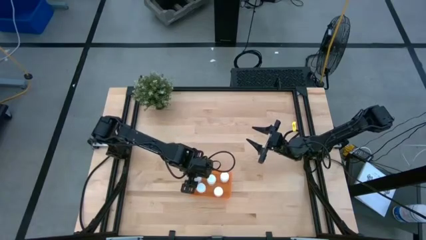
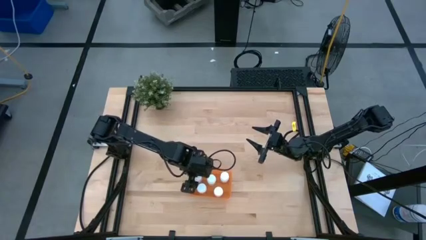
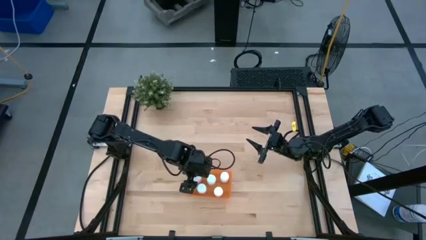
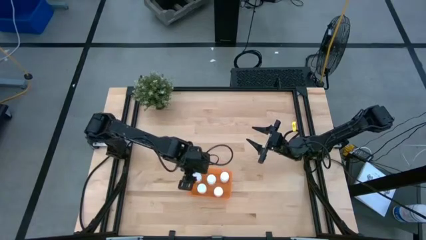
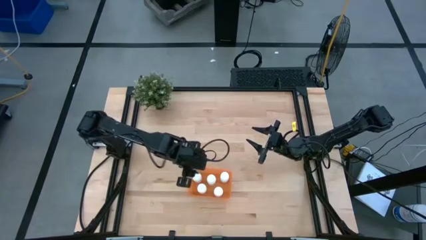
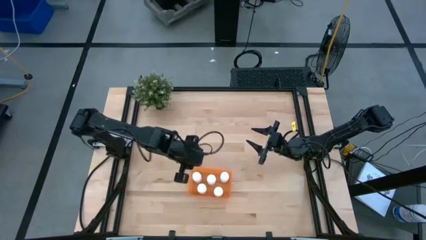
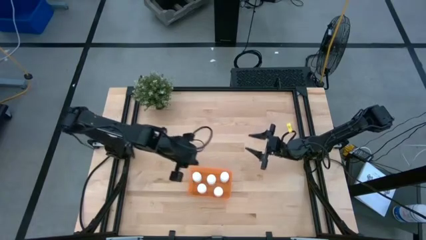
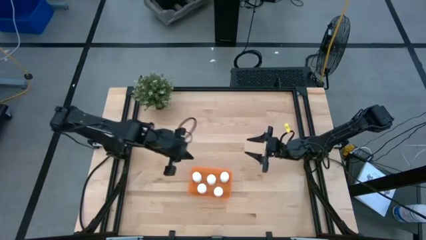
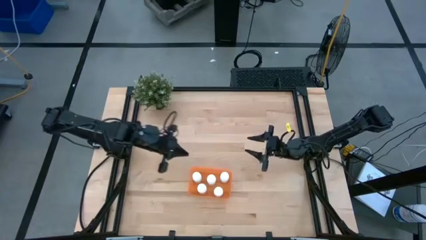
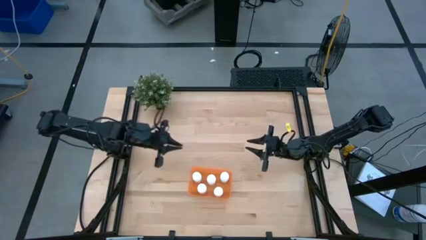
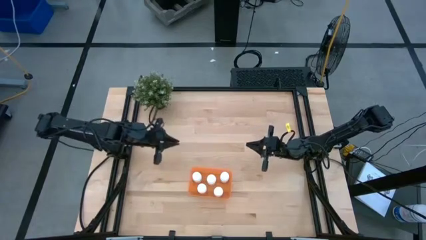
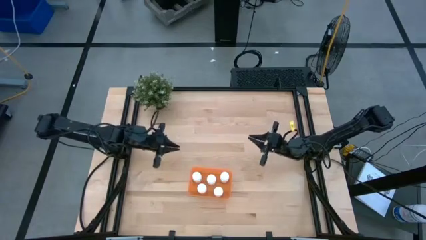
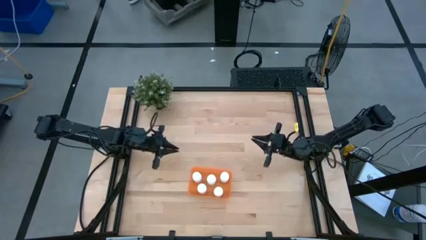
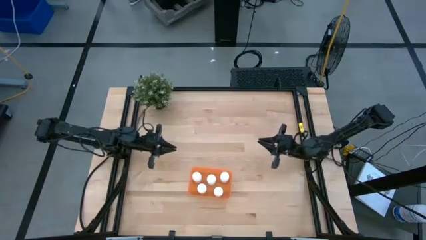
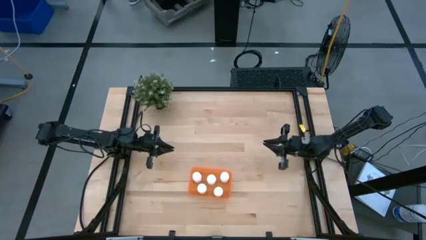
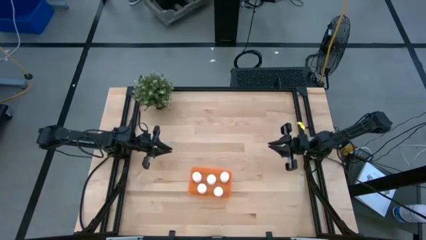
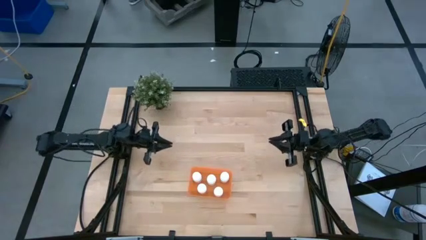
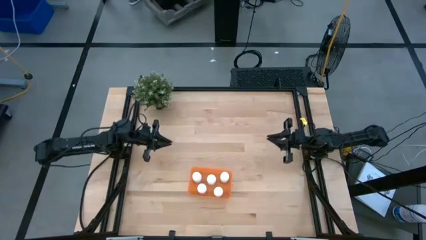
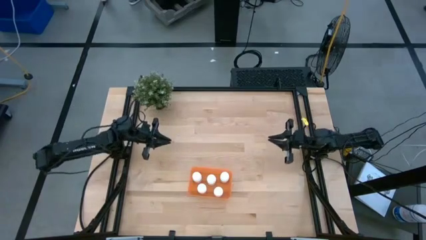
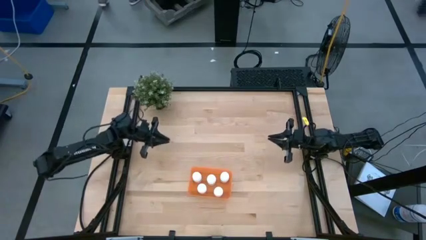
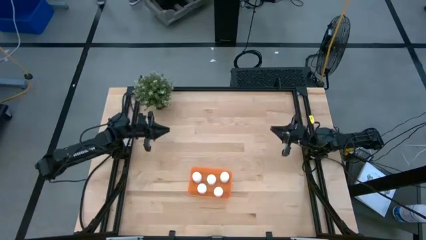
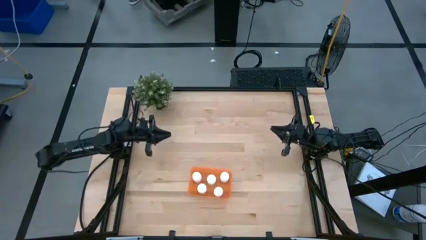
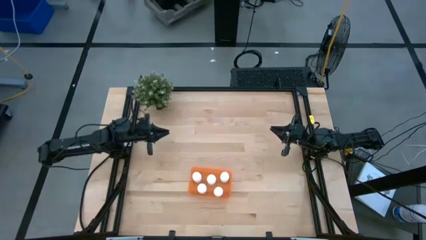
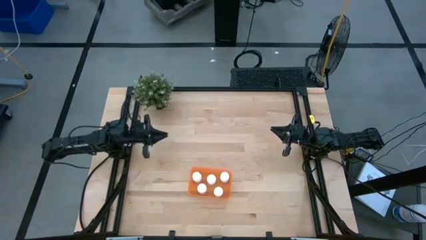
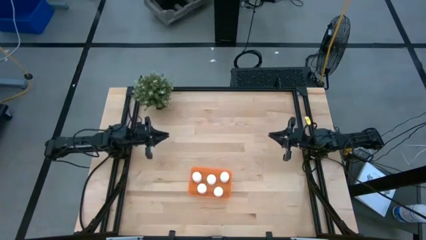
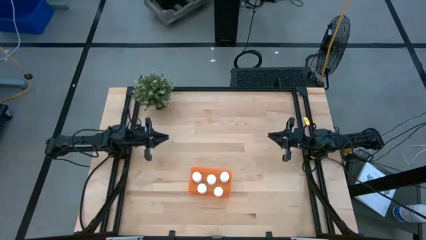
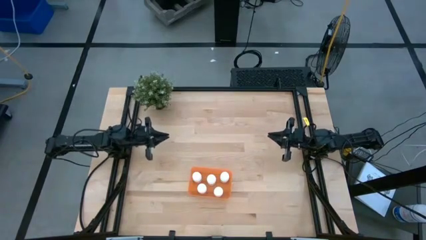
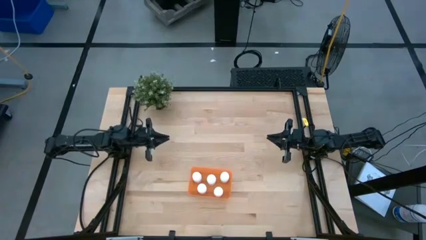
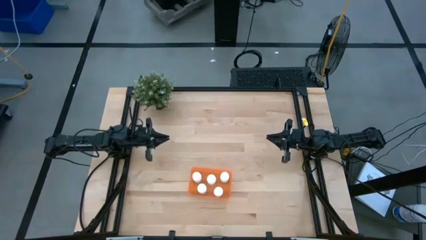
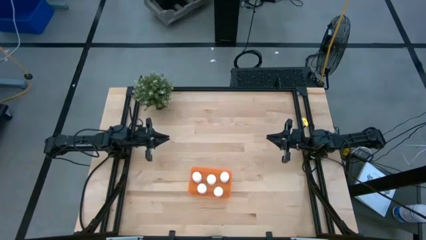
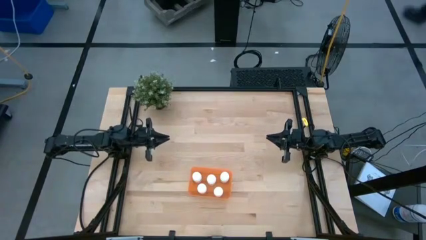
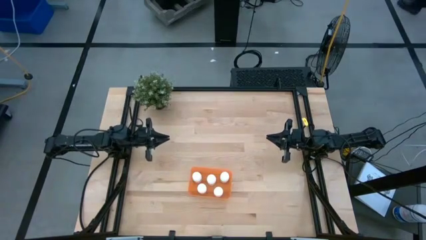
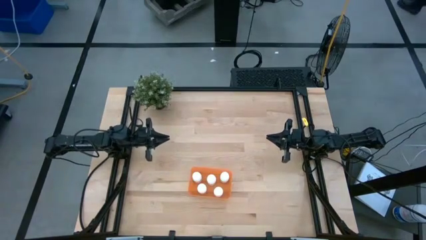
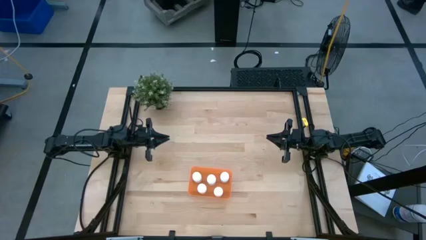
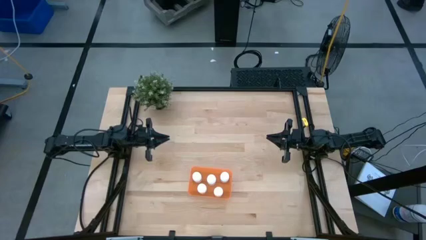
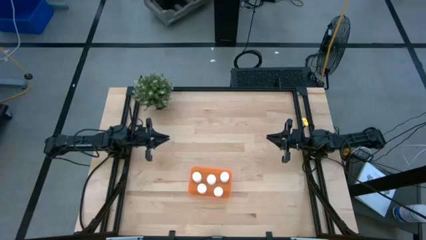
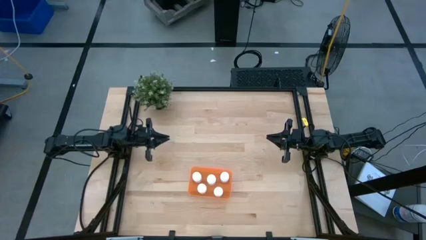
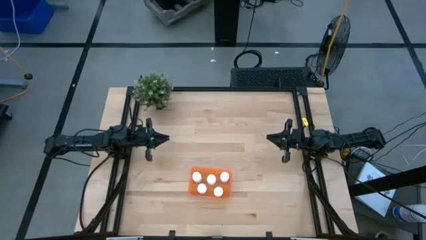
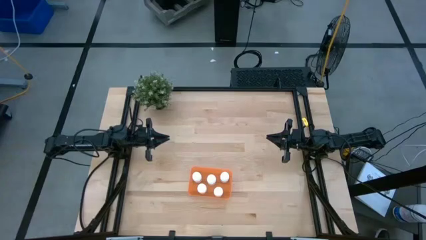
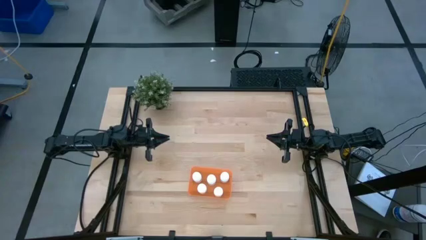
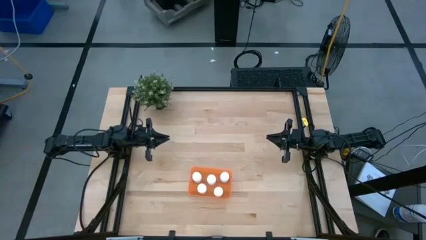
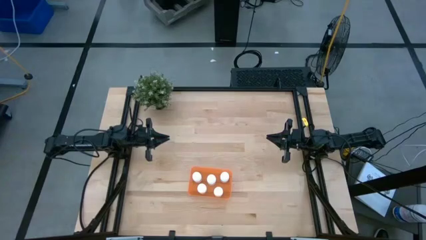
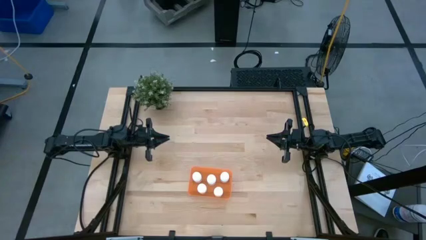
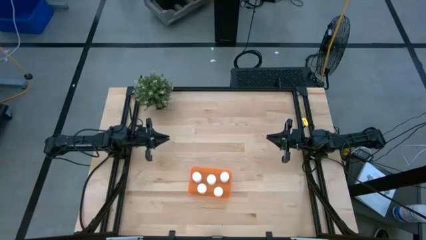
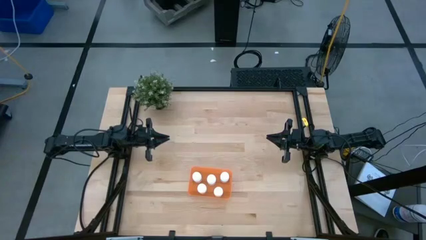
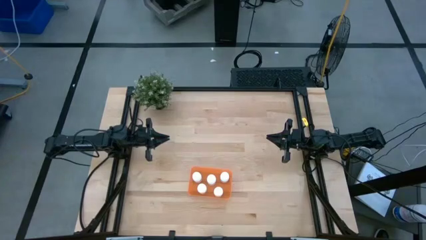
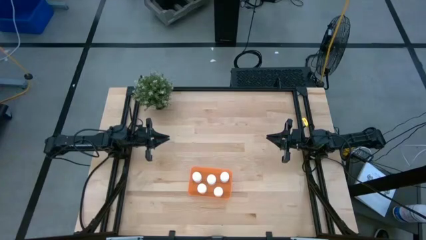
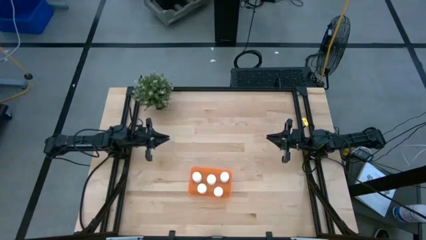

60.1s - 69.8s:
Task: Pick and place pill bottles into a basket
Return to Home Position
